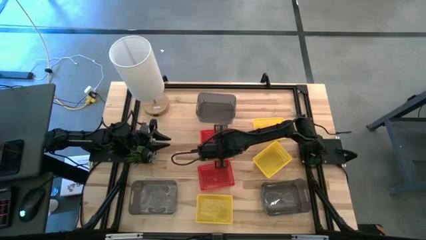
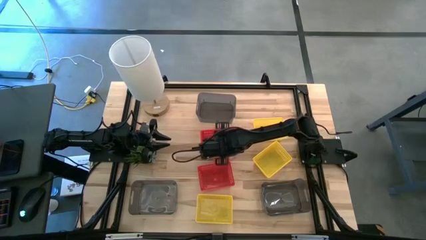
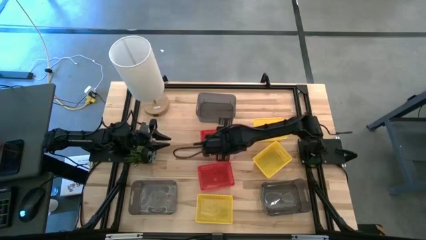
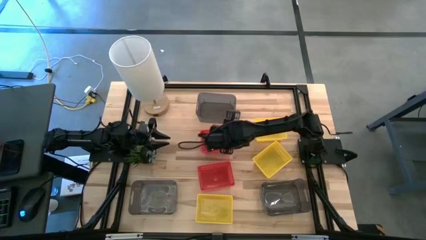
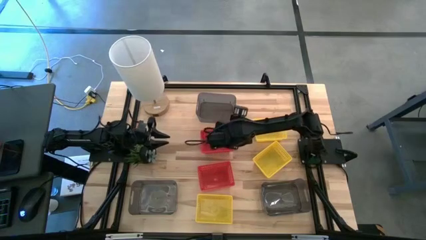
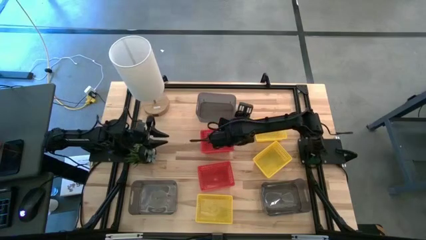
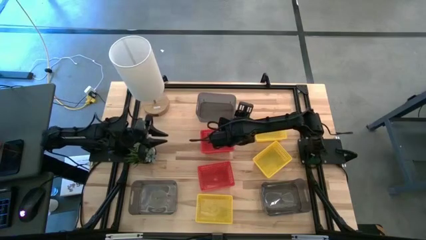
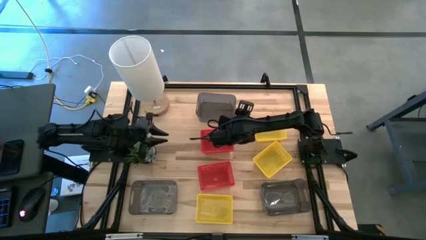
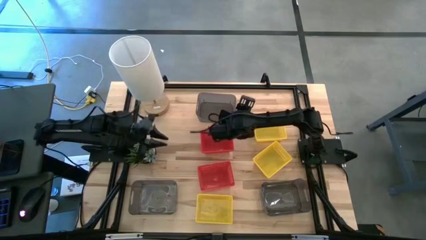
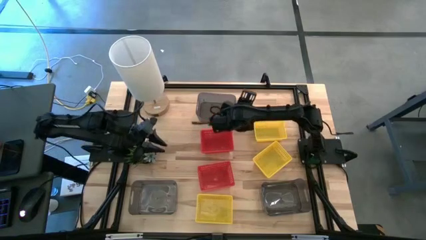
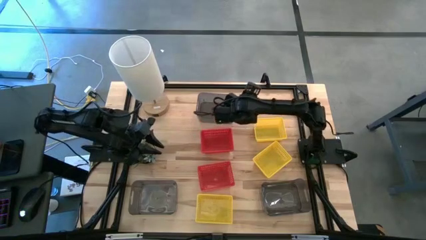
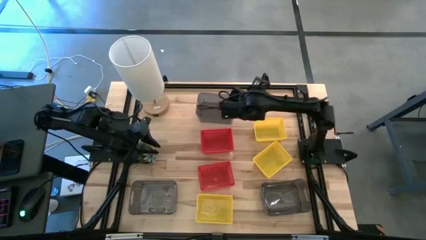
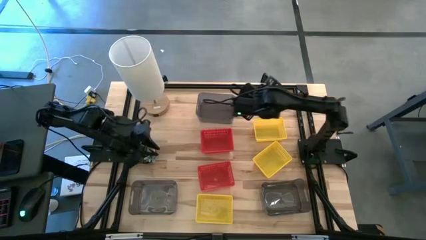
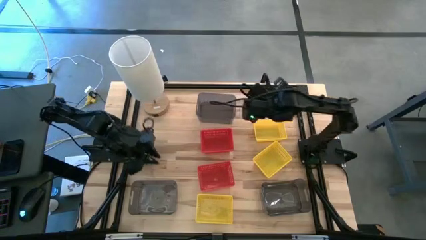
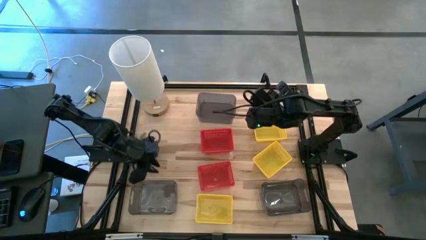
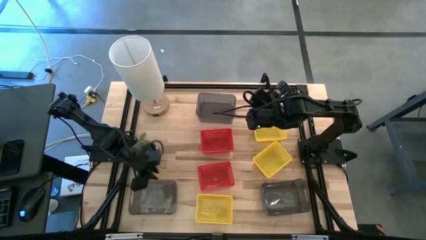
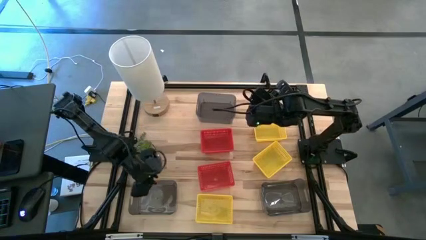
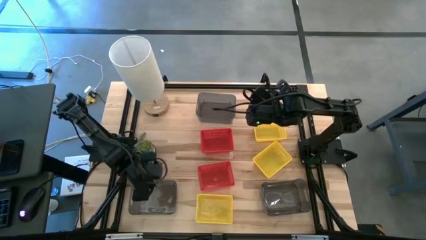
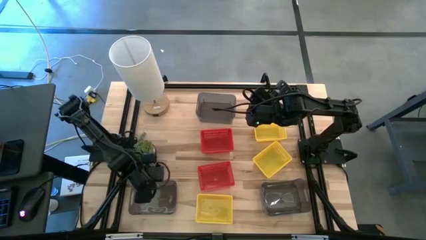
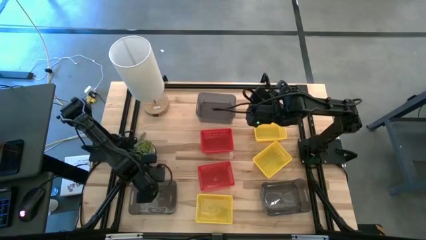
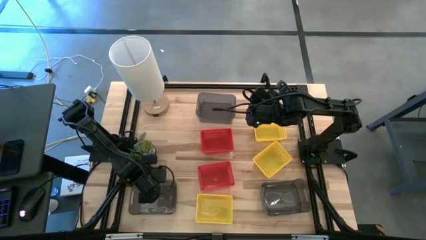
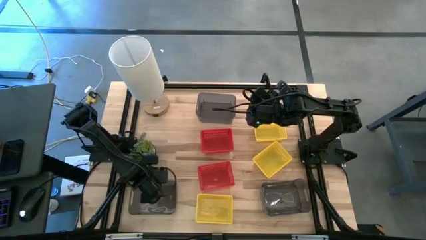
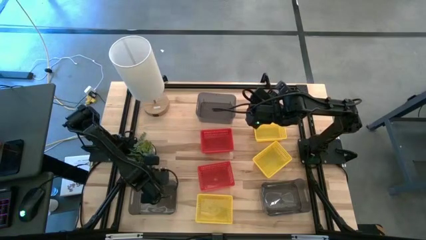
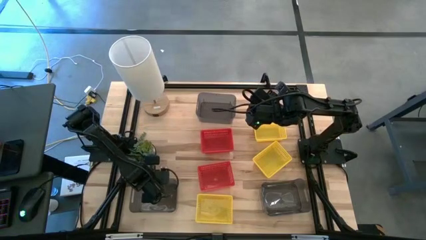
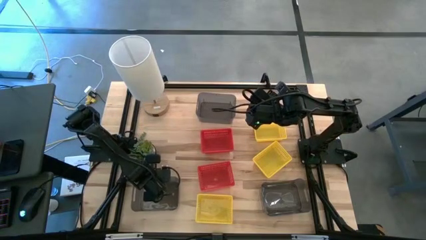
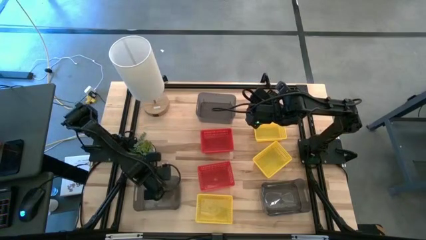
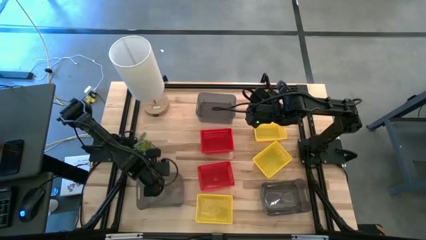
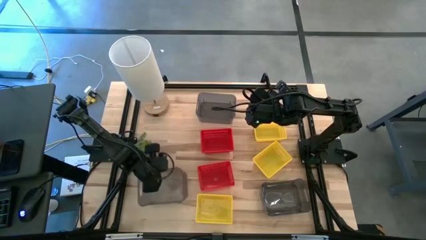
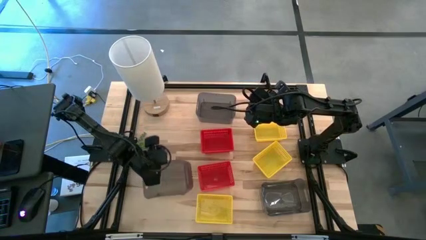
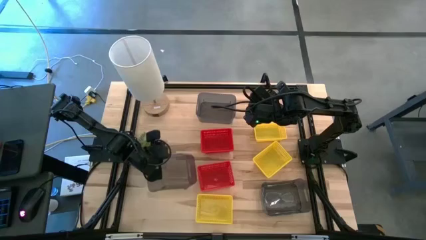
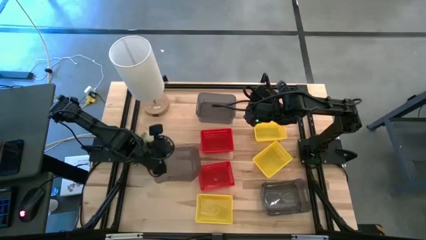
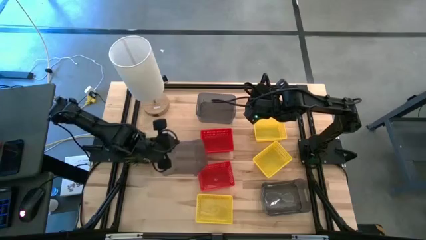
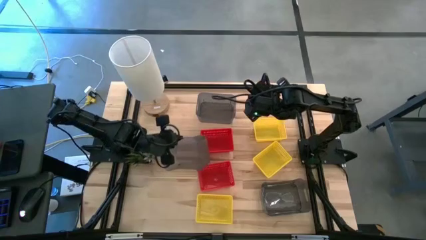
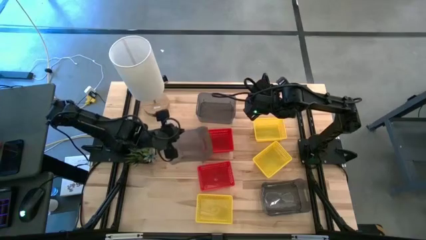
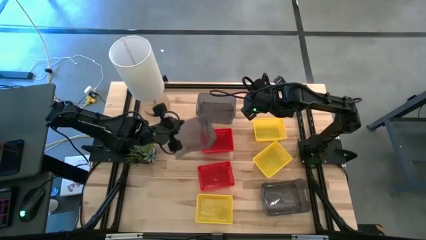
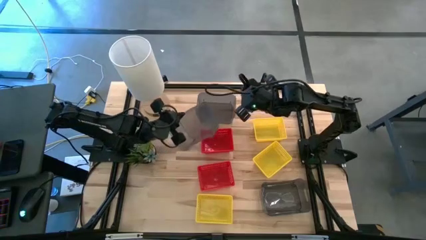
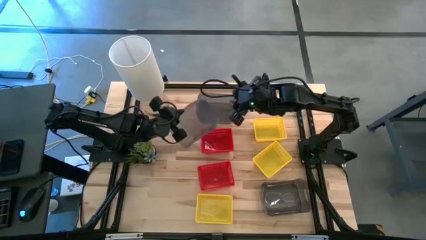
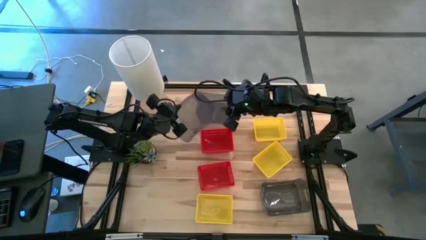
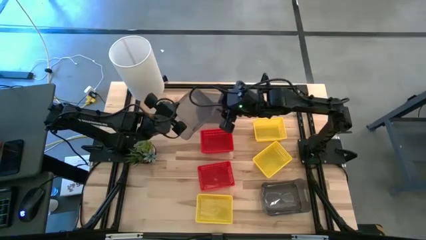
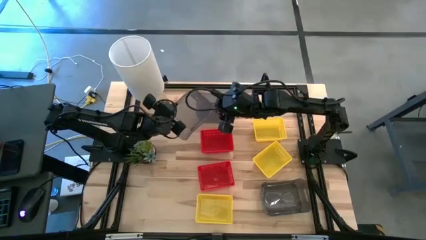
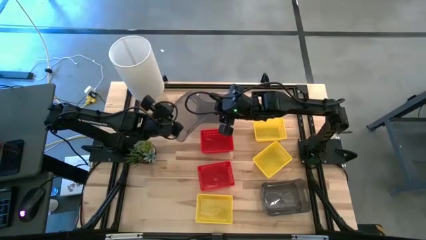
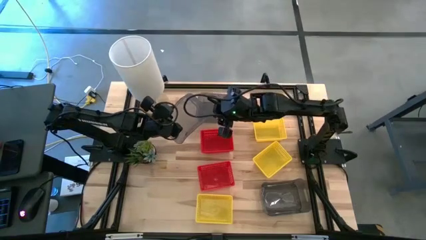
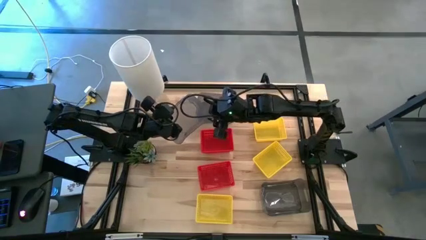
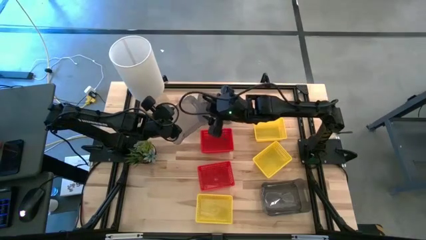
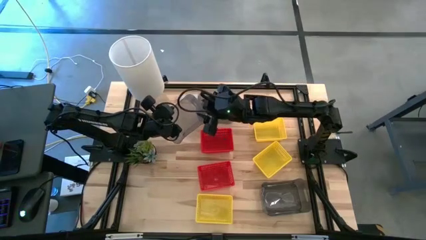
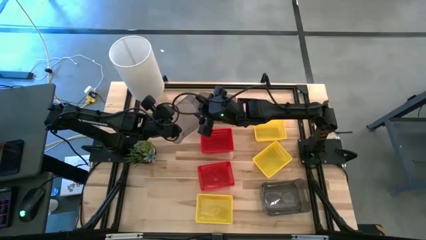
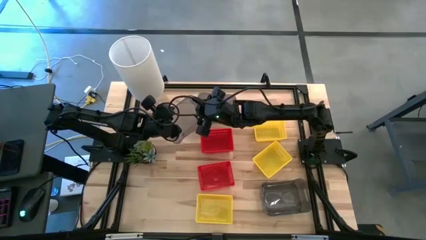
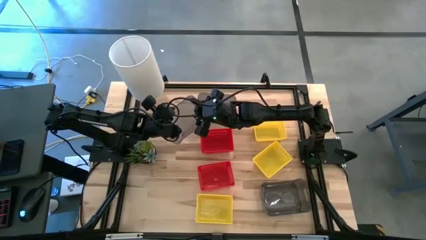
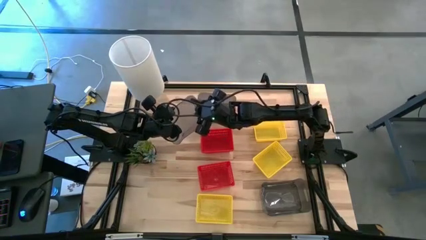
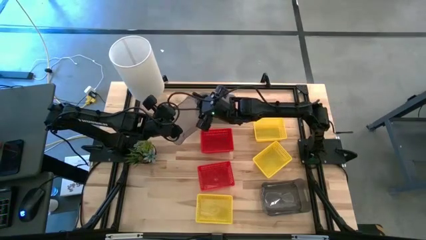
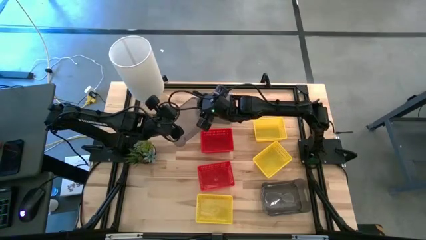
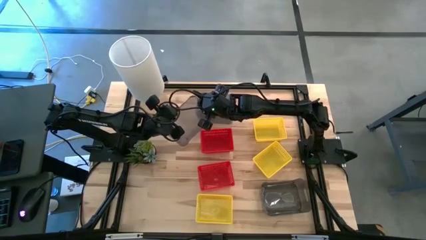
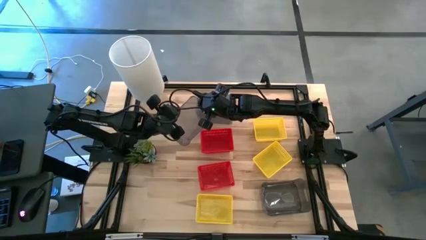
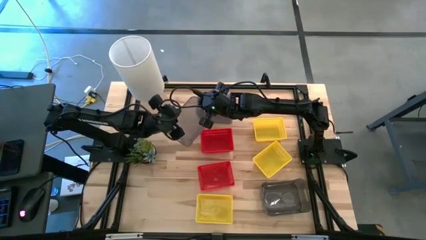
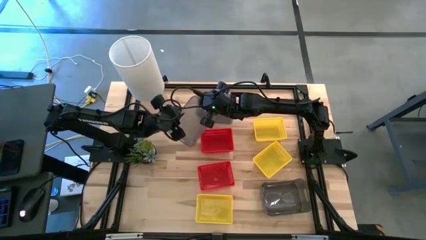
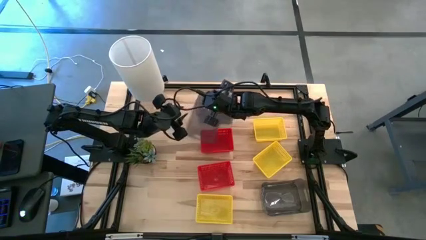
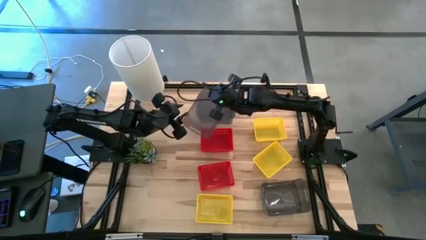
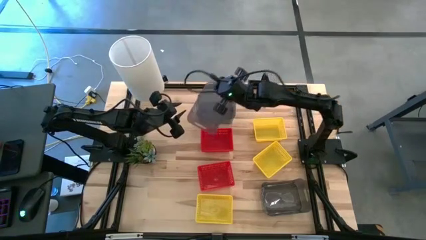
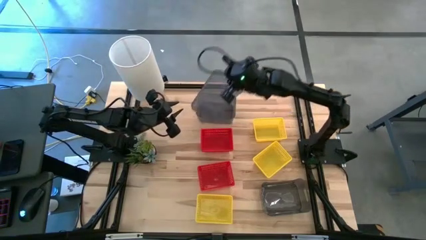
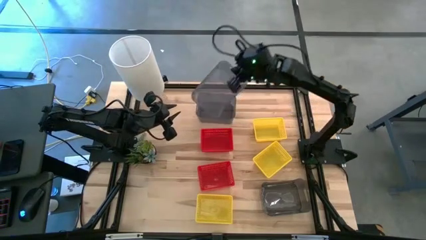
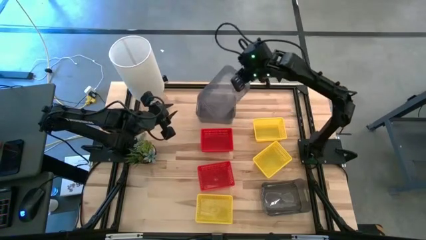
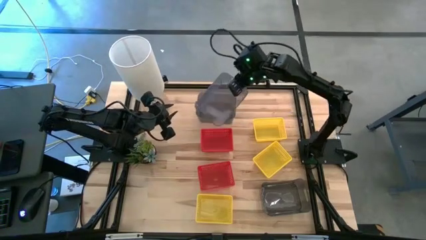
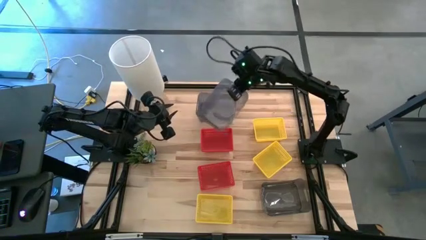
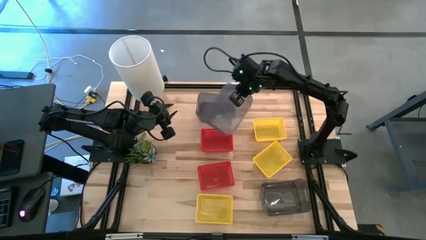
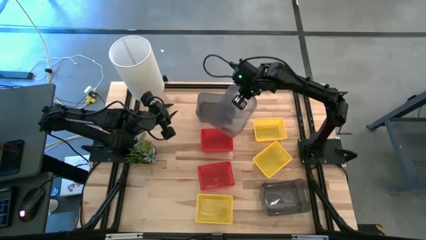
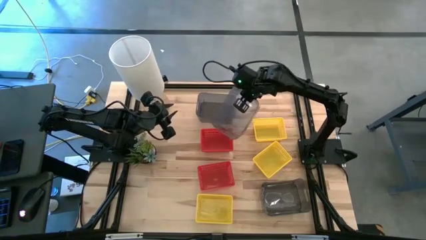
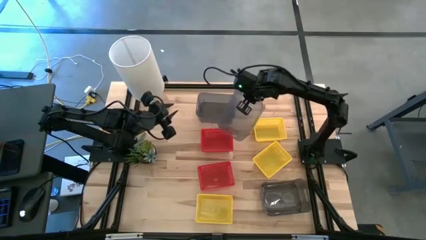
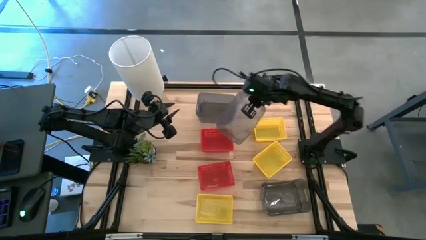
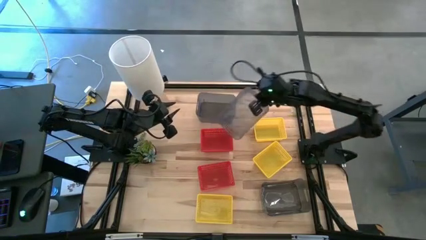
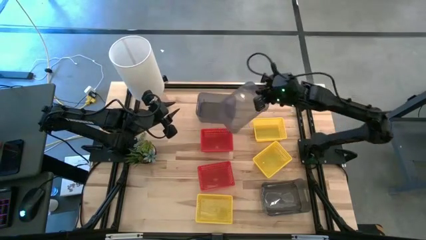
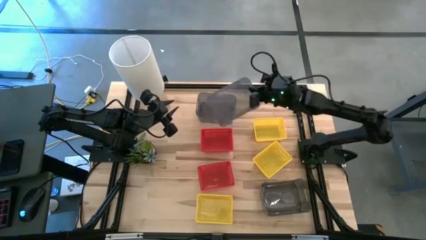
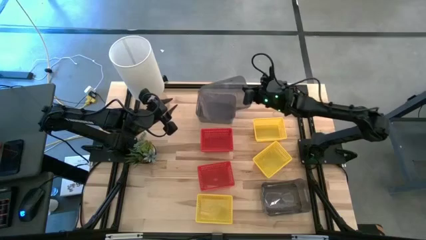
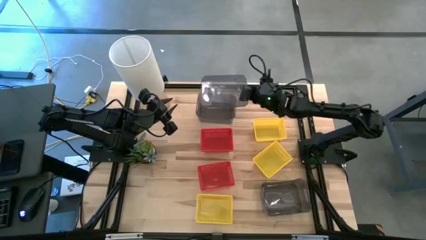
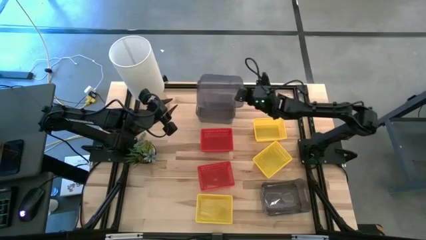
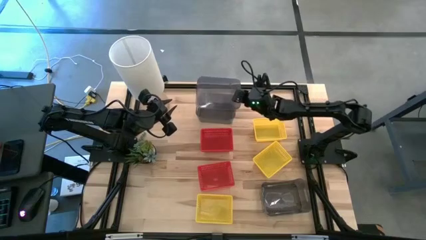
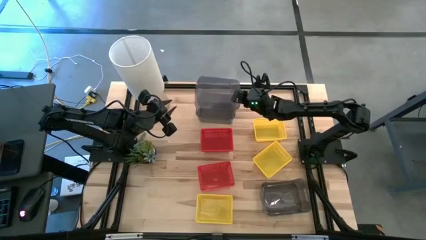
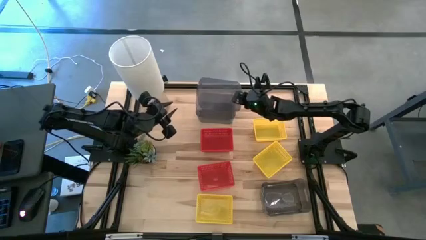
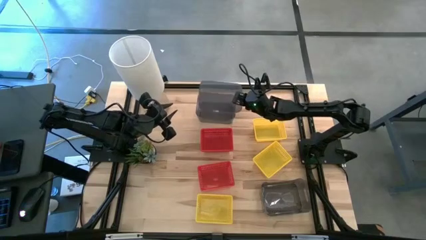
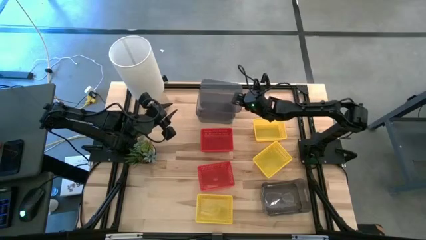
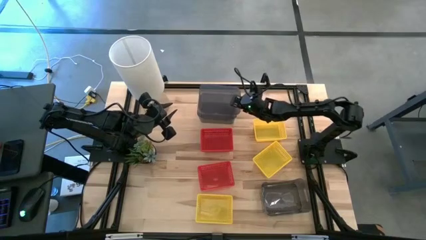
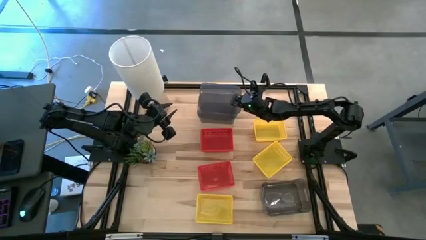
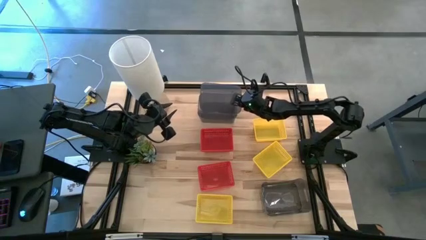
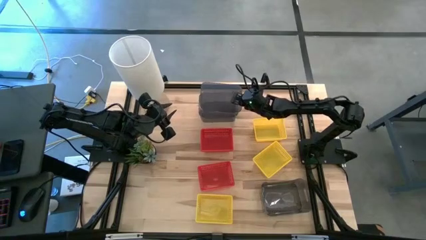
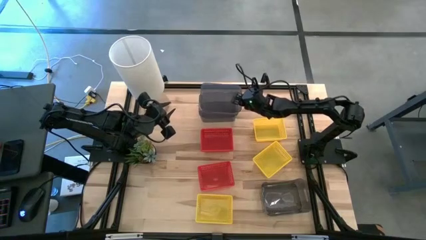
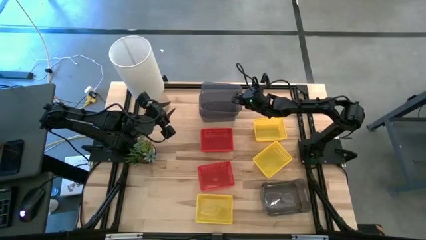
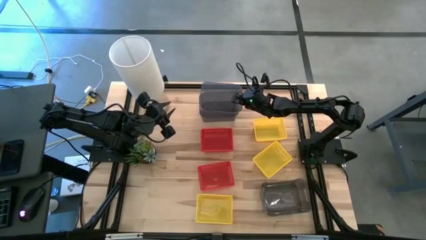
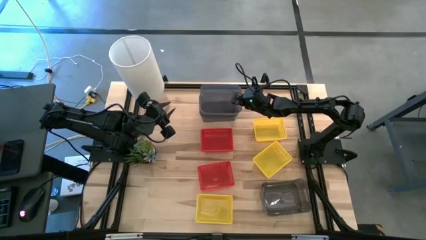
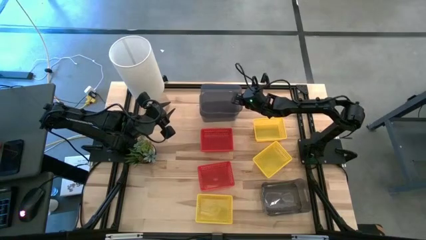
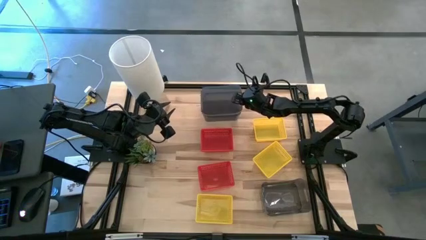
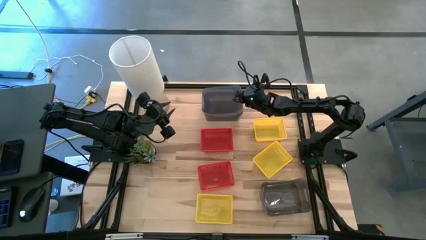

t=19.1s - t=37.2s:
Stack the bottom left black basket on the top black basket
